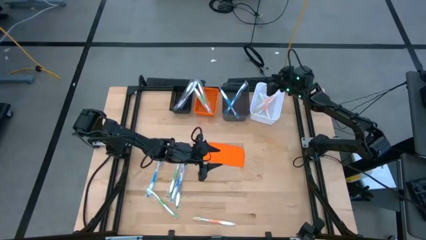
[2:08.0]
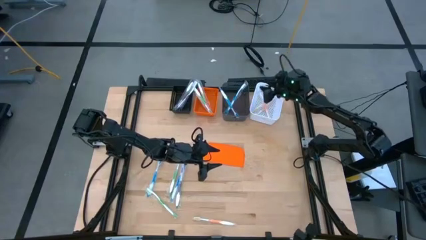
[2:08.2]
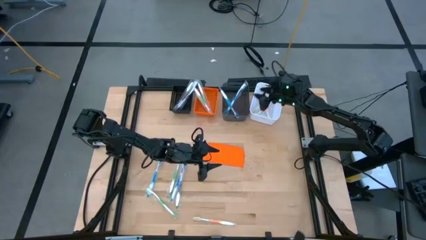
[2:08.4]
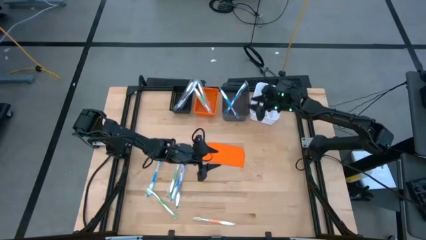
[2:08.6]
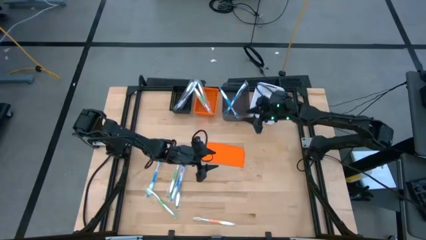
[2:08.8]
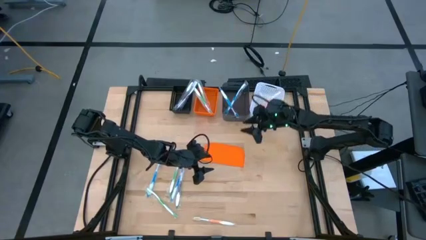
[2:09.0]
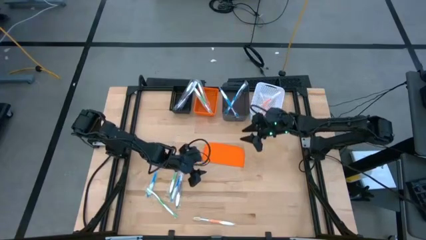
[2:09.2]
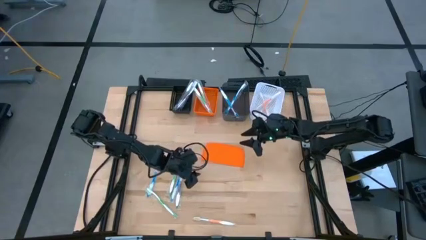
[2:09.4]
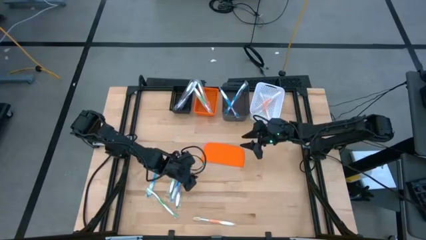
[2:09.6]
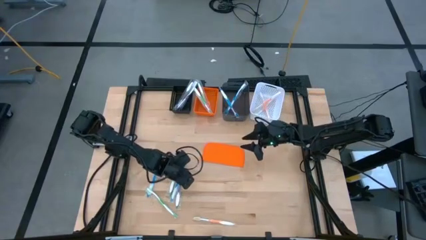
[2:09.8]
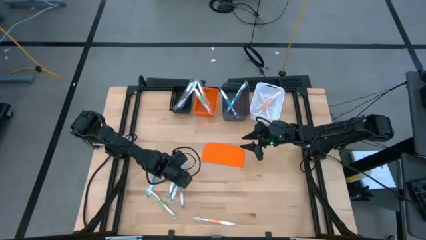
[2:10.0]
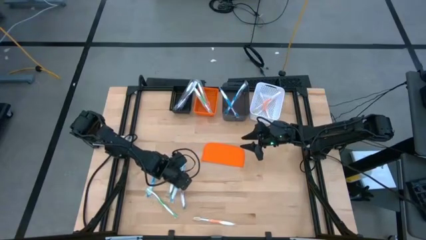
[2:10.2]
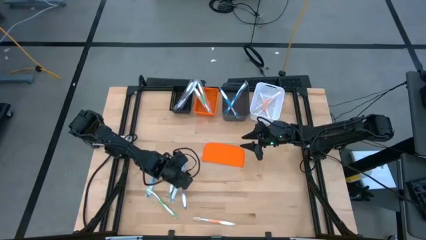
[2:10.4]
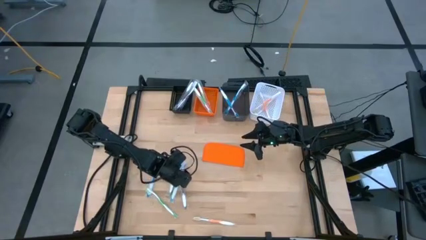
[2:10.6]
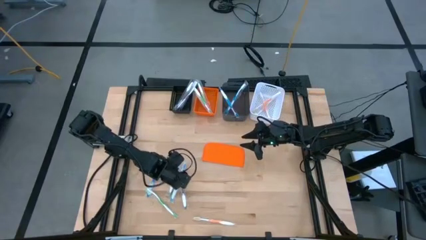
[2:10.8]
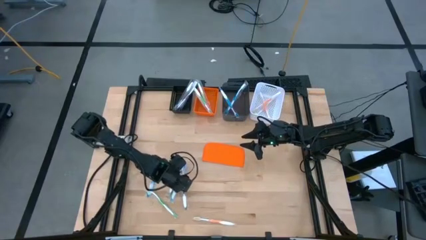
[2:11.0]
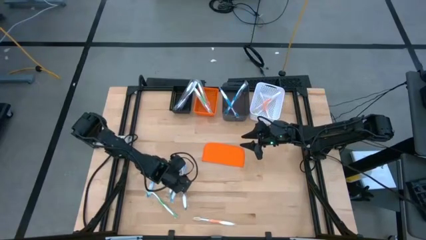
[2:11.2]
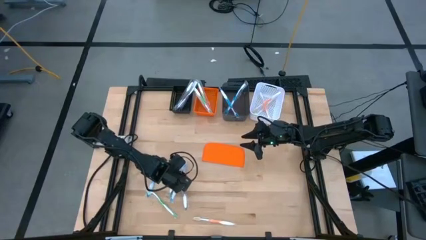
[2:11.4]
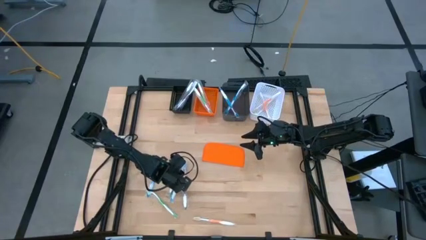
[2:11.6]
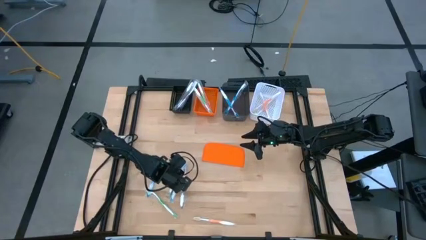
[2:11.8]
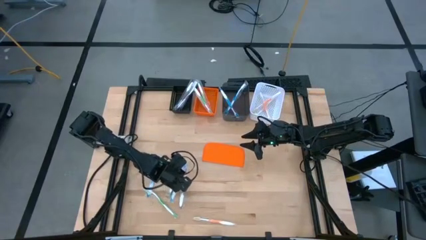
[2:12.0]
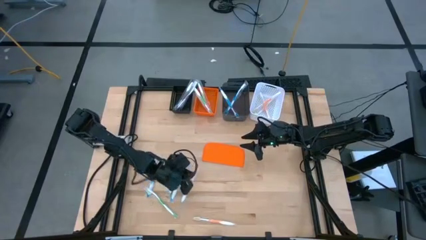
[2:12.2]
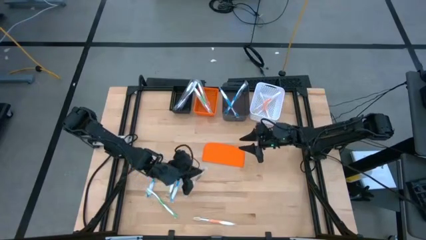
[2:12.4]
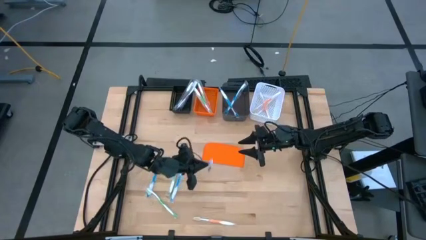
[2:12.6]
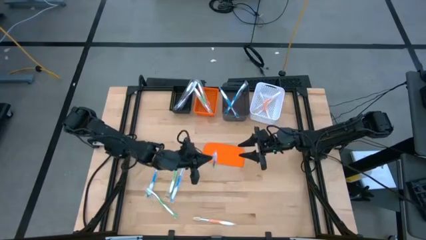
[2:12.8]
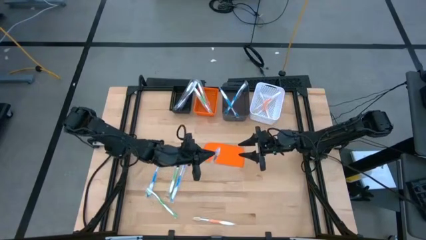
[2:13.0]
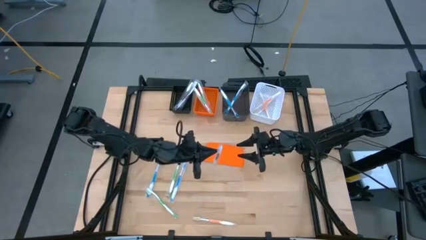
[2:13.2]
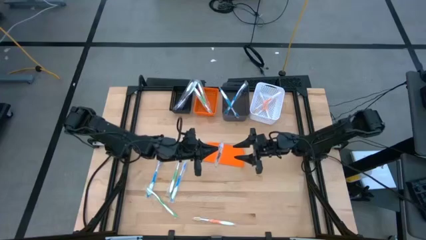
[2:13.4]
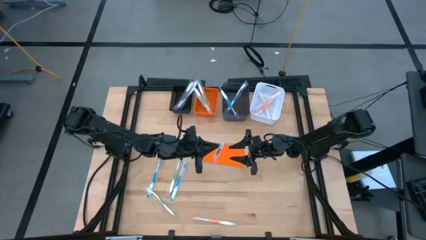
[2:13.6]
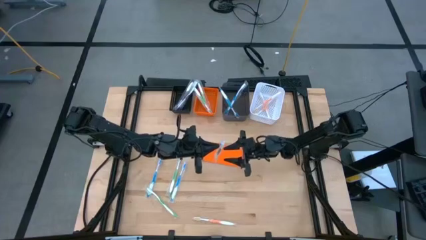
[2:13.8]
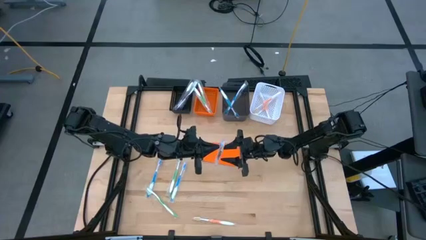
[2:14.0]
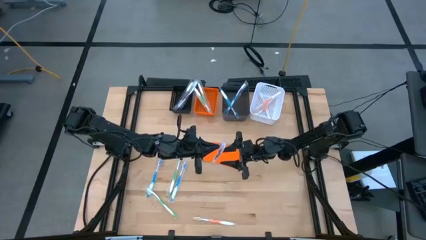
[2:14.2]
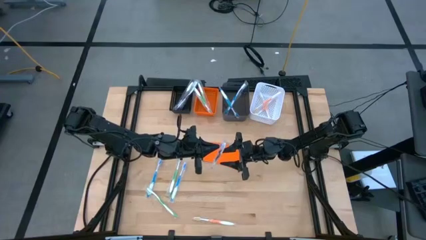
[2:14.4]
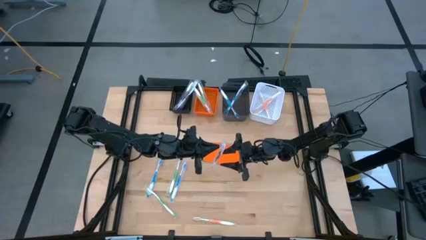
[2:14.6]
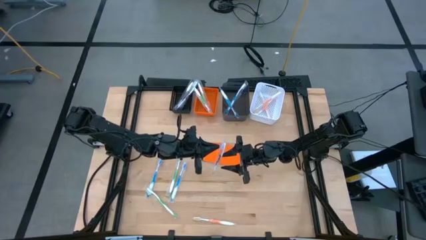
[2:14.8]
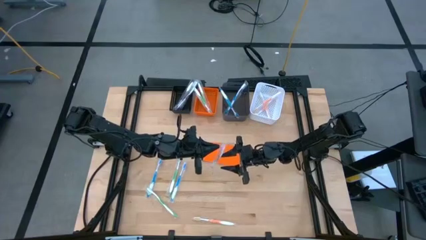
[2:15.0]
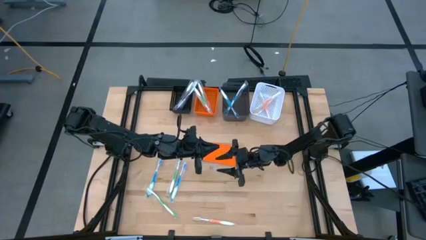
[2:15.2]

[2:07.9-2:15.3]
Task: Pick & Place Toothbrushes
Put the violet toothbrush into the black bin

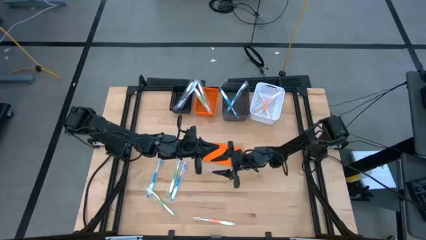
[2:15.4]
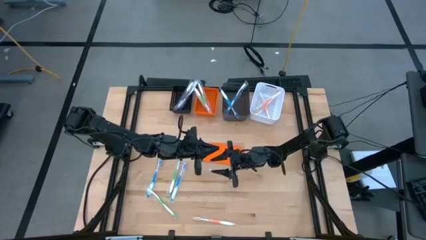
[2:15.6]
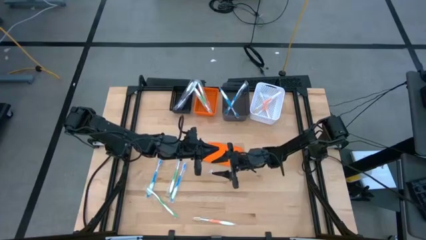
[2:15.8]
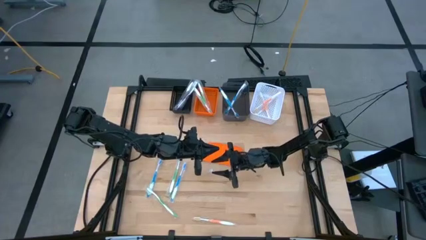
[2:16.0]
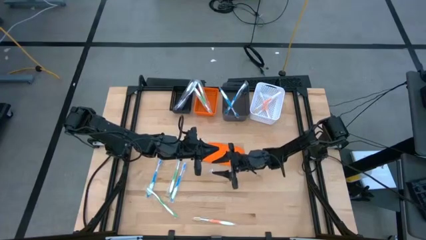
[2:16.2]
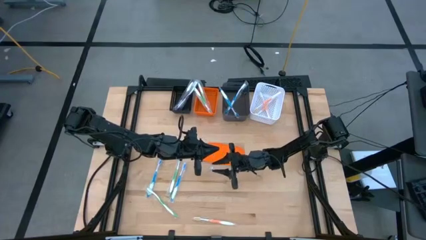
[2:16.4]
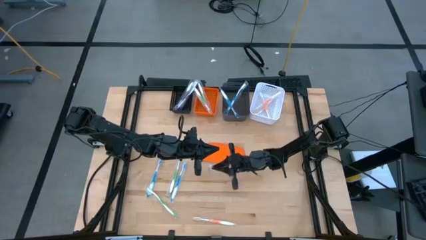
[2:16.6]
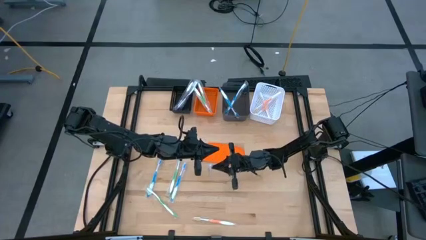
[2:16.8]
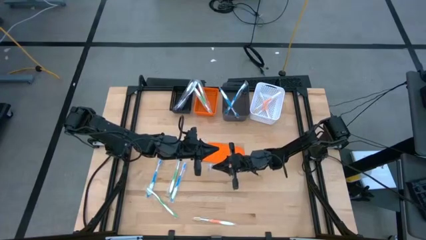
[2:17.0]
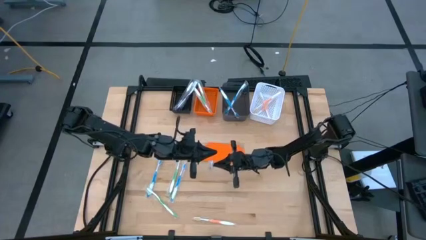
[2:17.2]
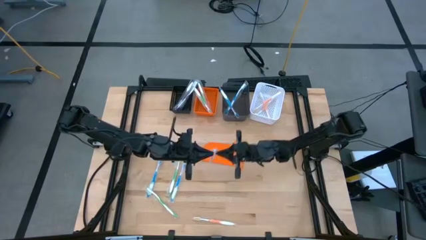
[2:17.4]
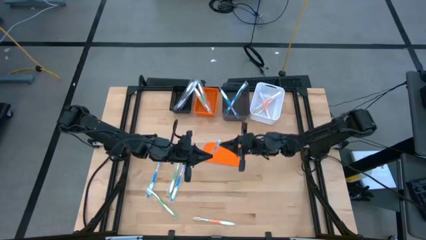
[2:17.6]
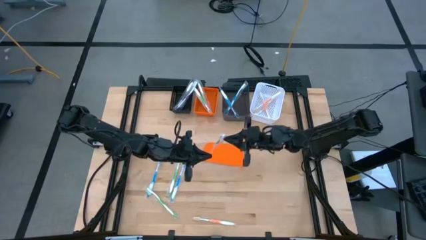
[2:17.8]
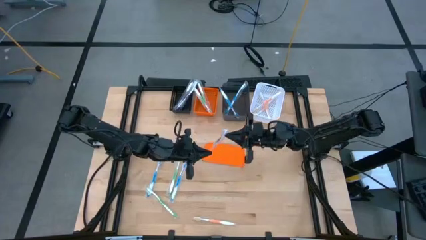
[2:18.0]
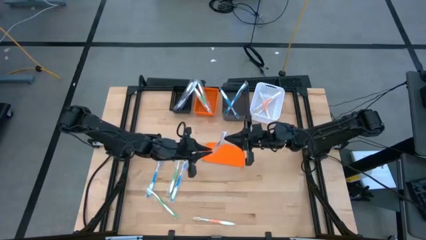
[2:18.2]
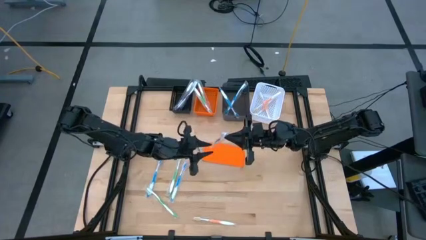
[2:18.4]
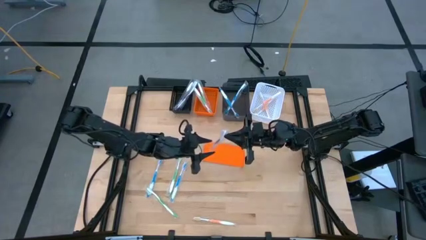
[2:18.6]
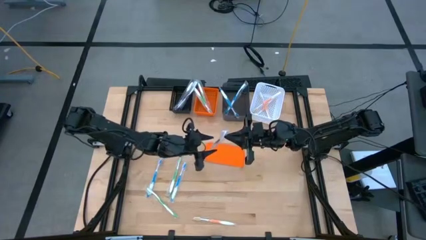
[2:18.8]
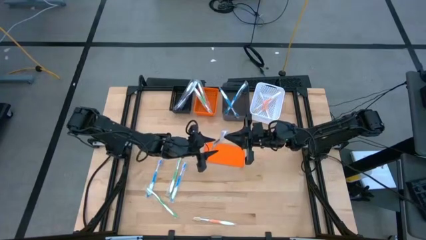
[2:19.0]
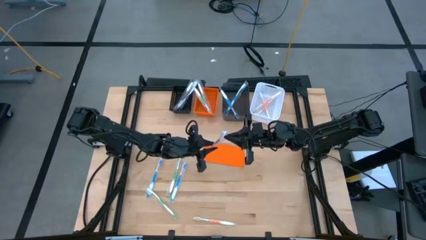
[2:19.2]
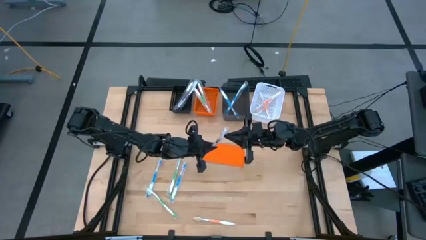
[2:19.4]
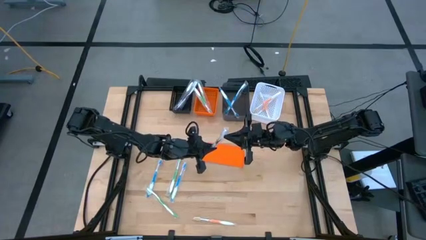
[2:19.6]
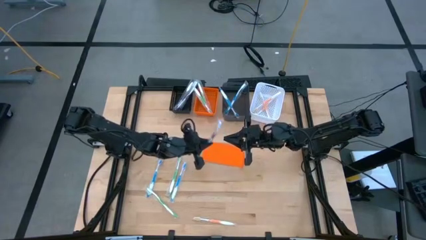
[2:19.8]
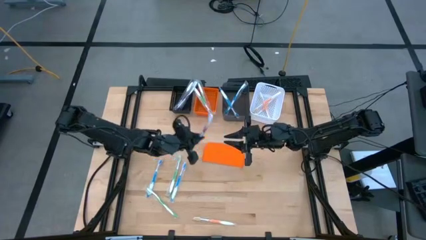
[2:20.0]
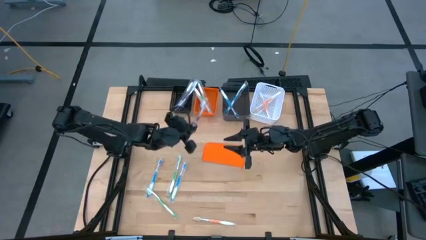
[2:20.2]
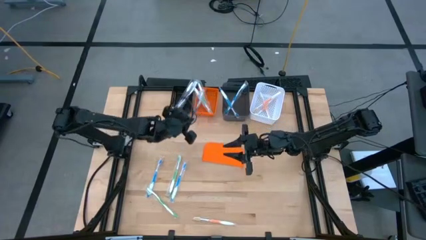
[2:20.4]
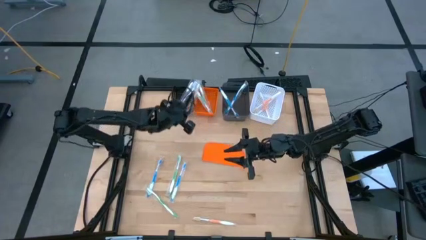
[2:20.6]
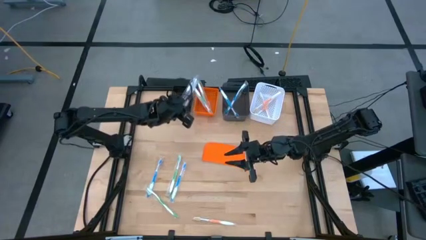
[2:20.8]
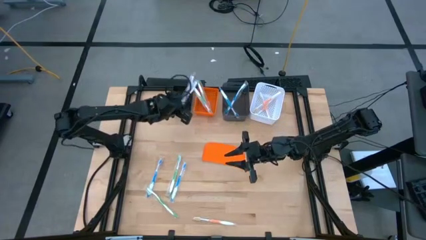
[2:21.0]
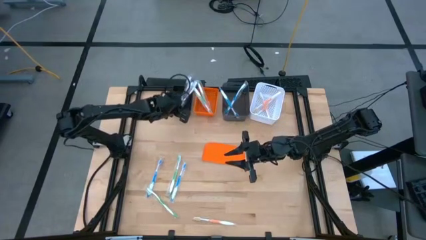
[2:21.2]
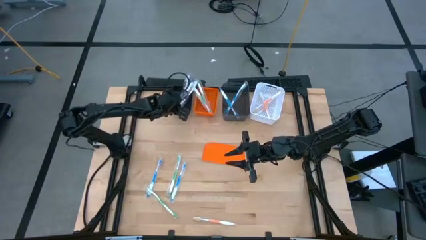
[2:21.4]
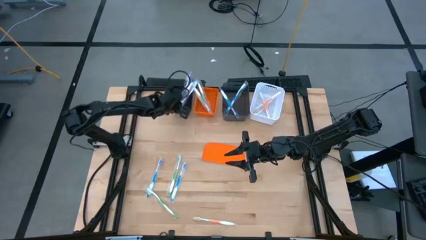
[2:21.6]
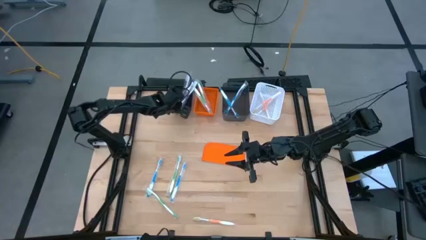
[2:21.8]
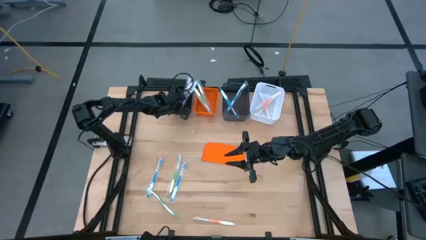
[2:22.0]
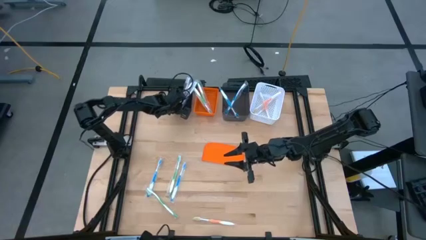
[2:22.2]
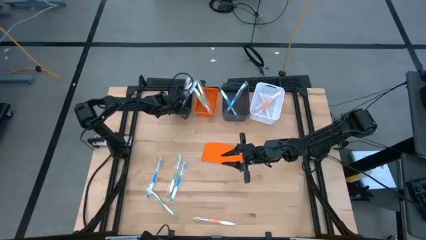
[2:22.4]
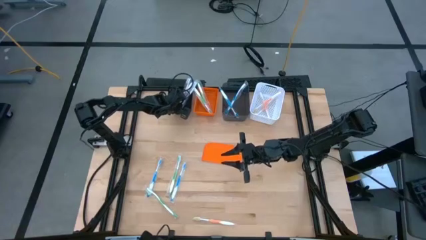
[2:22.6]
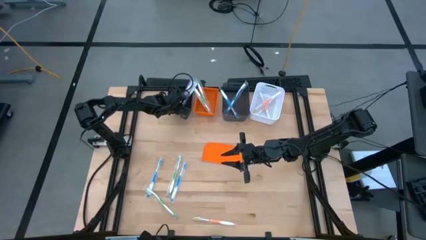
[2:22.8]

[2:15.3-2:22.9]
Put the violet toothbrush into the black bin
